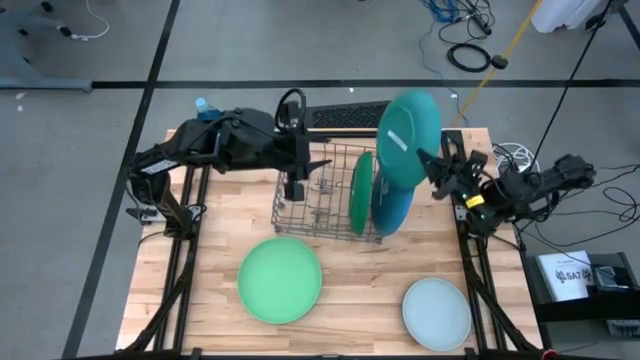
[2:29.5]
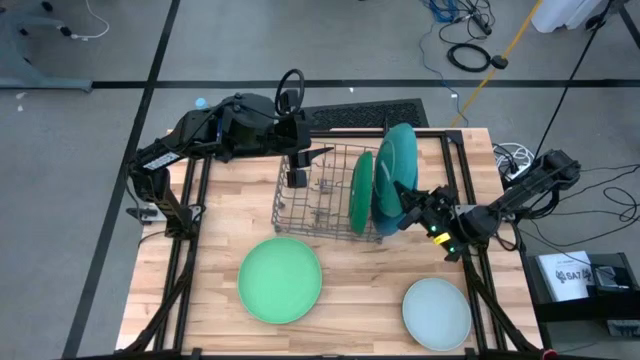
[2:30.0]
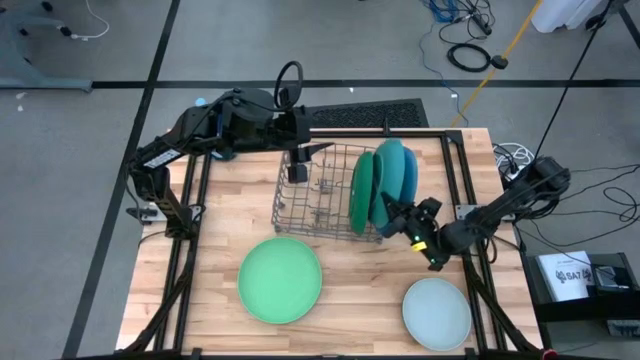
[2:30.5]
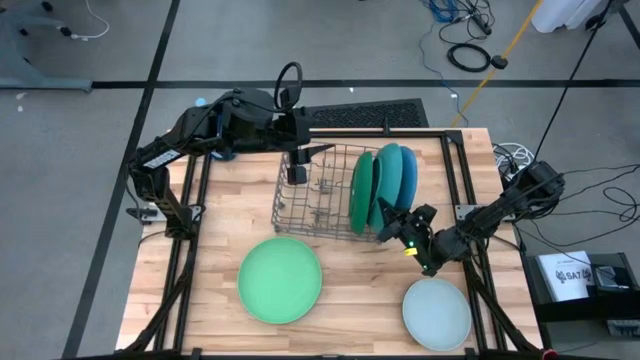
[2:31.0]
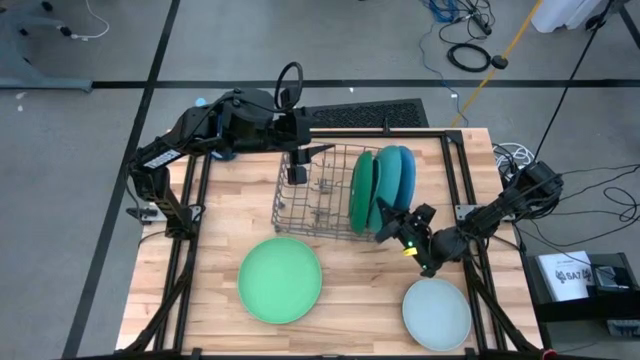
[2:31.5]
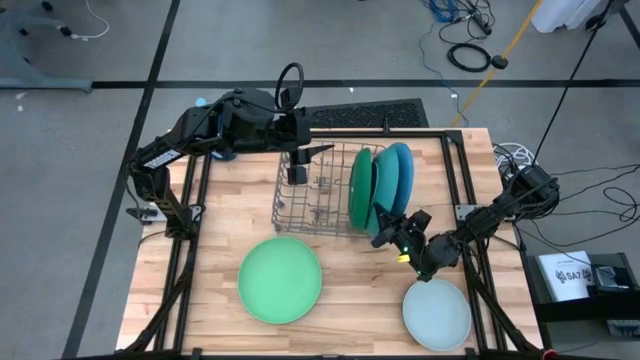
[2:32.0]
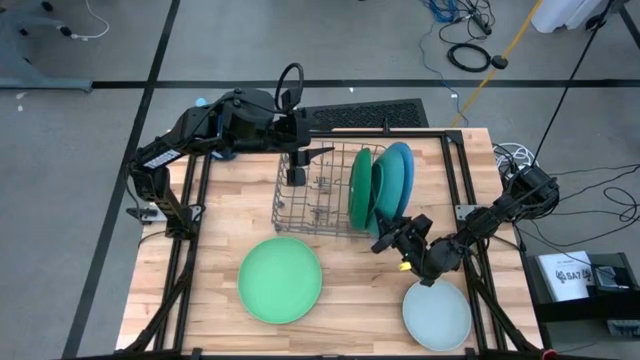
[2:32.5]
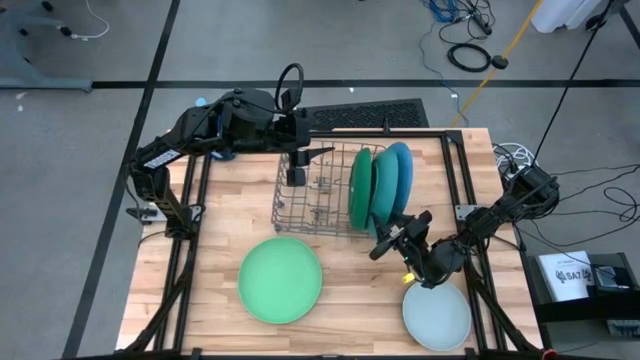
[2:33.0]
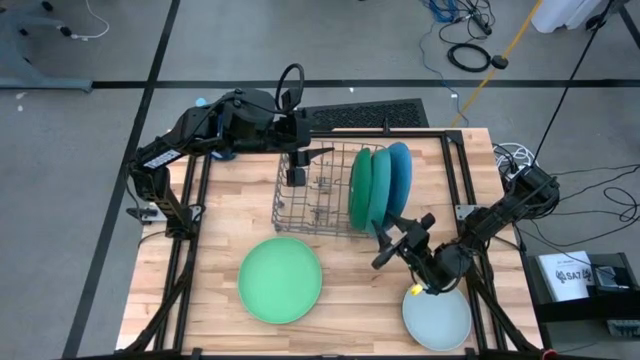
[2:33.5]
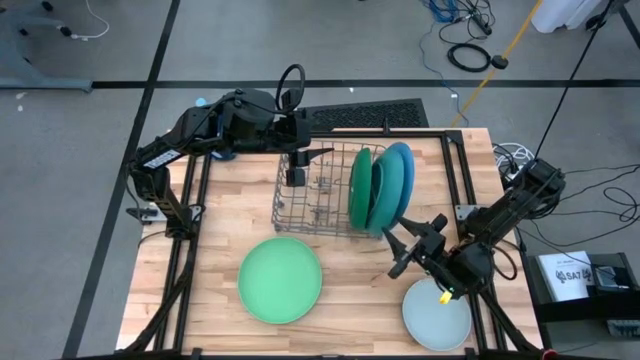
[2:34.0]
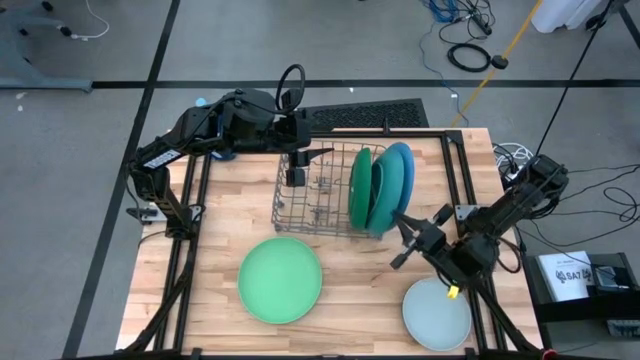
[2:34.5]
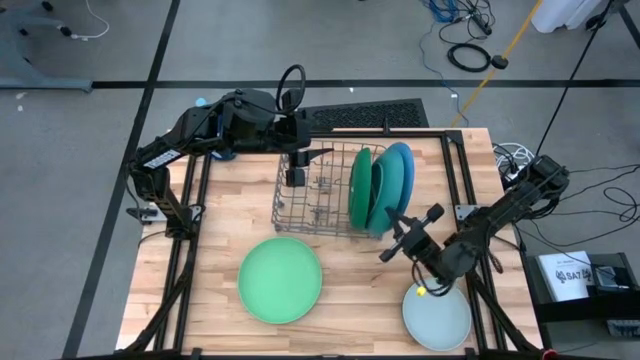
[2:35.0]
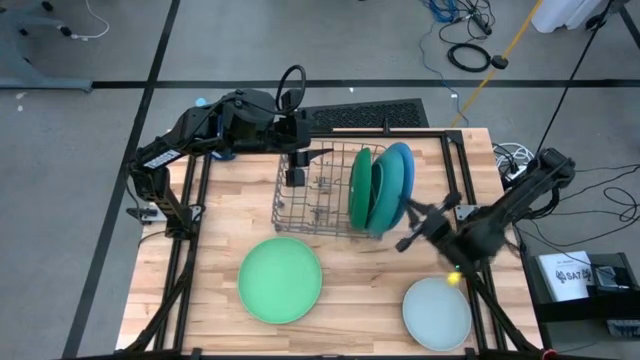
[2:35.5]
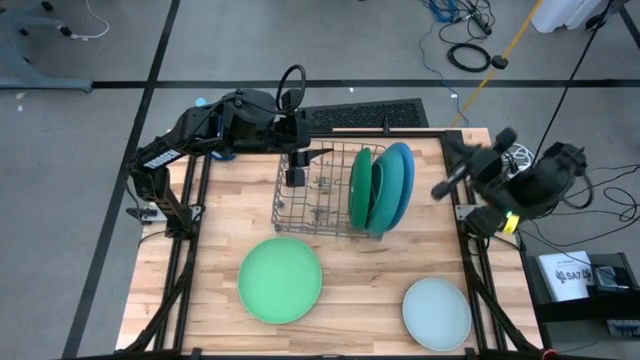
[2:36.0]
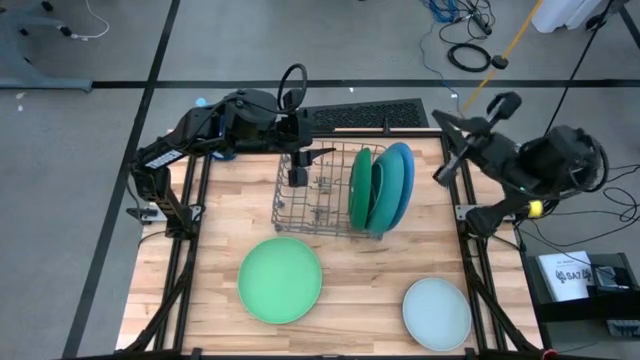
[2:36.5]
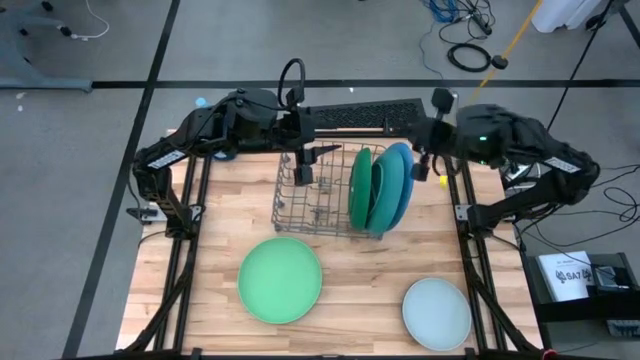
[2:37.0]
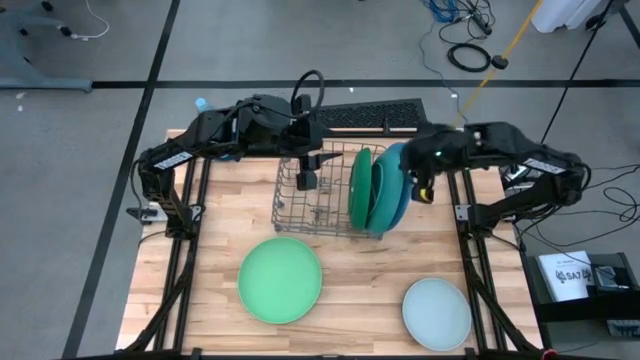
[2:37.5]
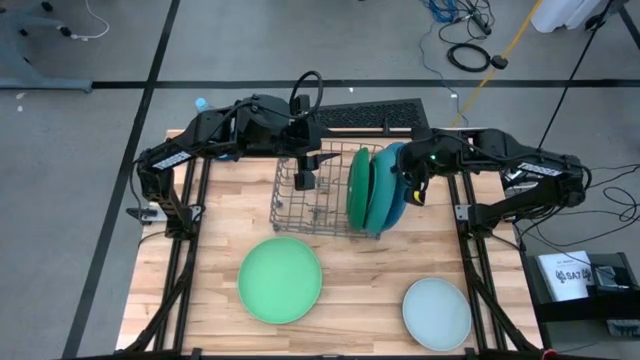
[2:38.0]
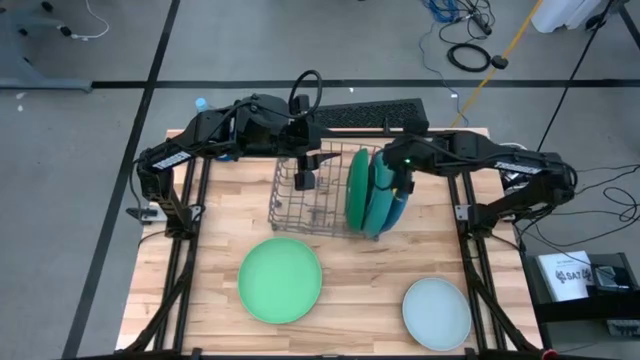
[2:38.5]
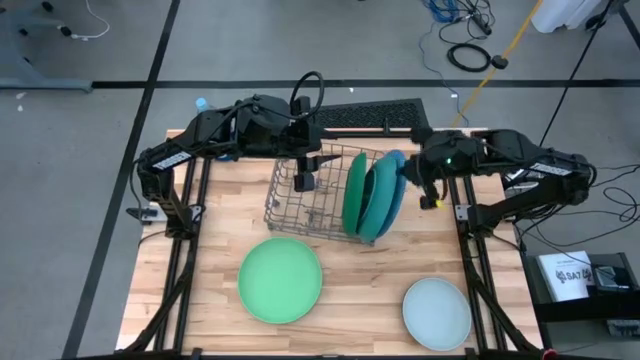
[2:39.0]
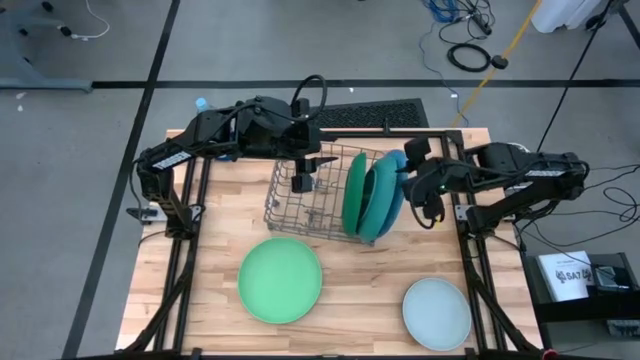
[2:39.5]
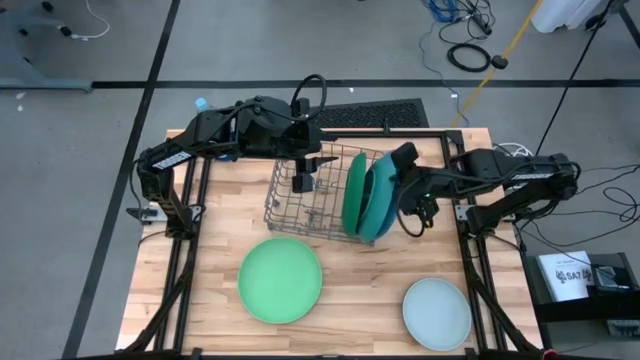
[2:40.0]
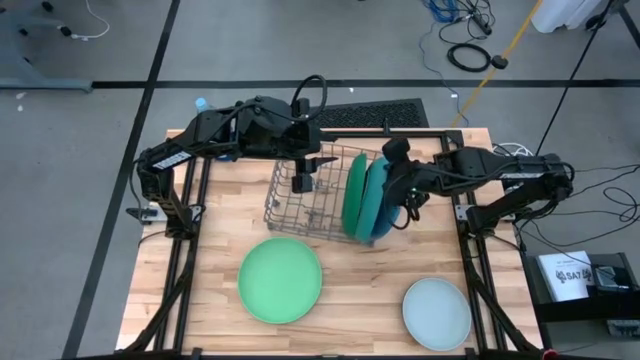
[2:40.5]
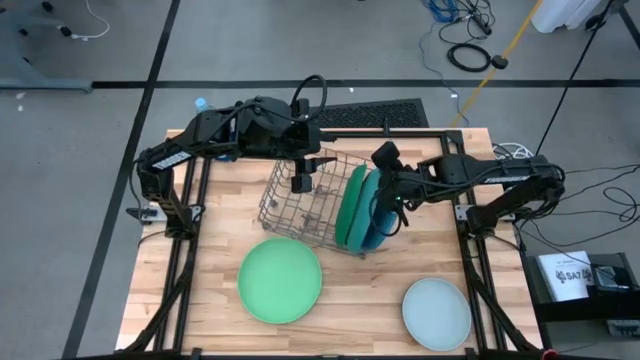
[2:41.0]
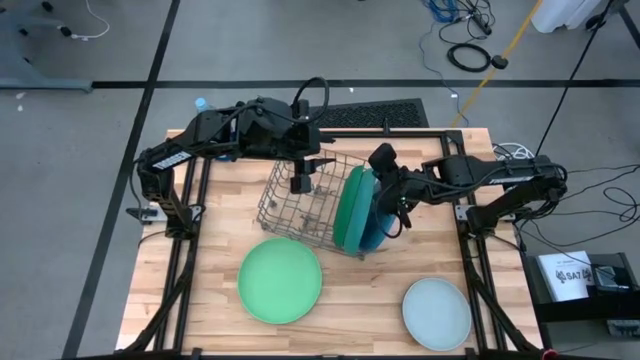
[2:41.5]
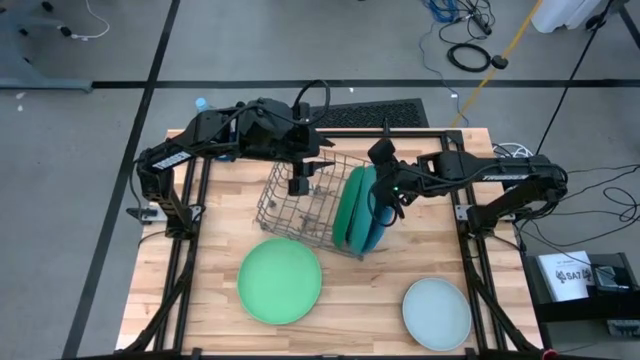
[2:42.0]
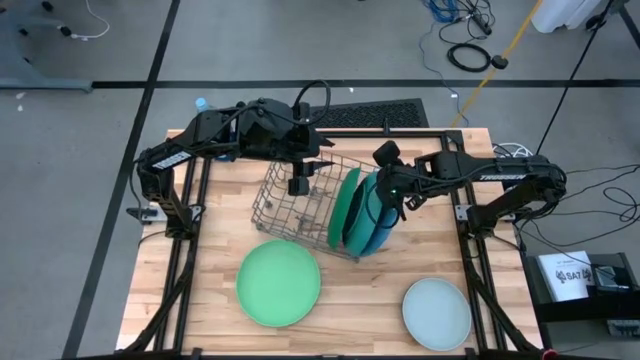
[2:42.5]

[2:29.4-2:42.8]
Task: Sort dishes
Put the green plate into the dish rack

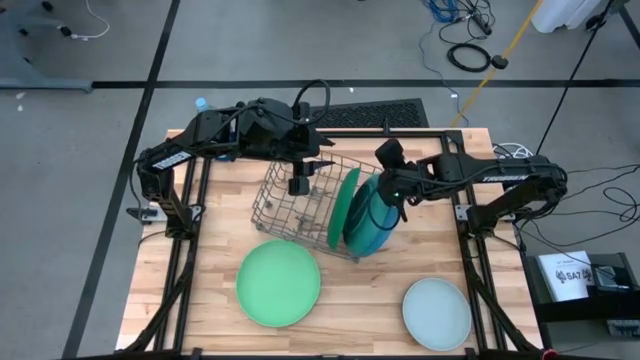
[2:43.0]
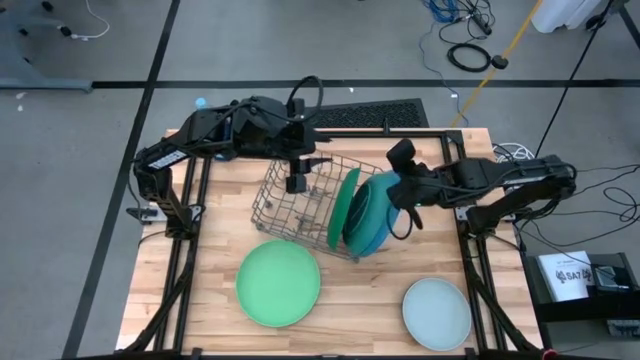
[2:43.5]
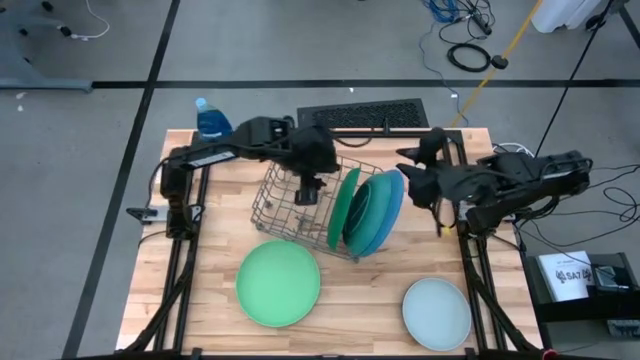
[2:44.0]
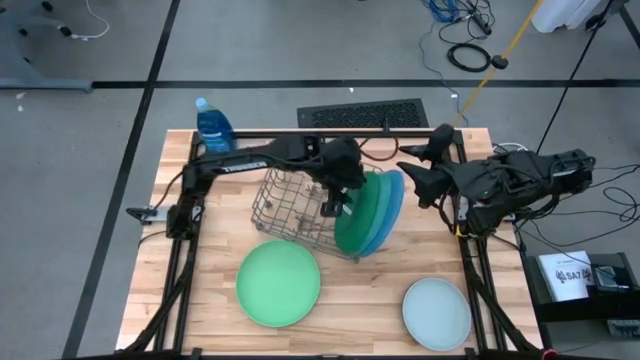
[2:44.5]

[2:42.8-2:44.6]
Adjust the dark green plate in the dish rack

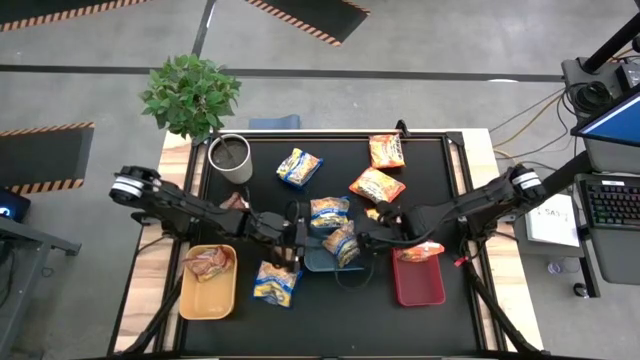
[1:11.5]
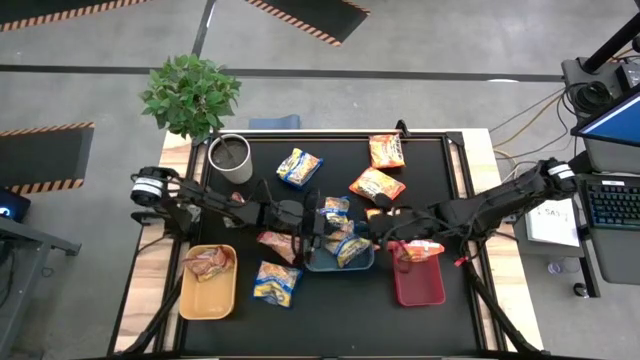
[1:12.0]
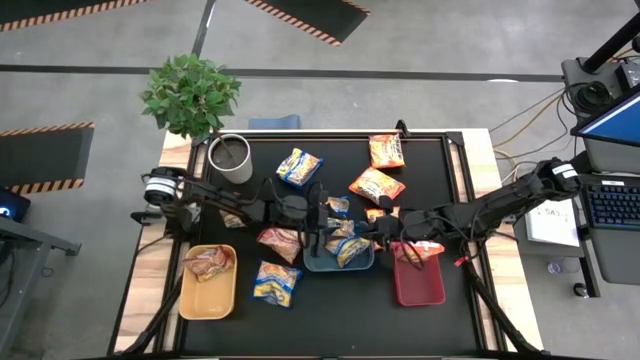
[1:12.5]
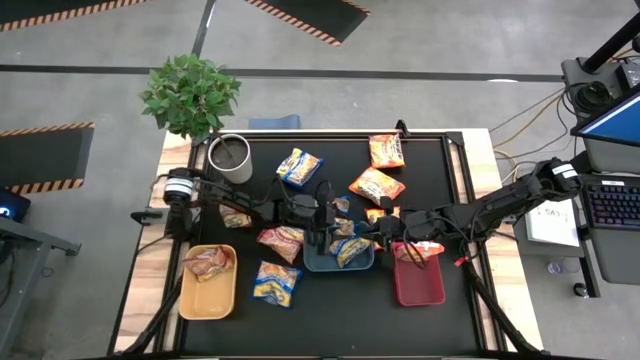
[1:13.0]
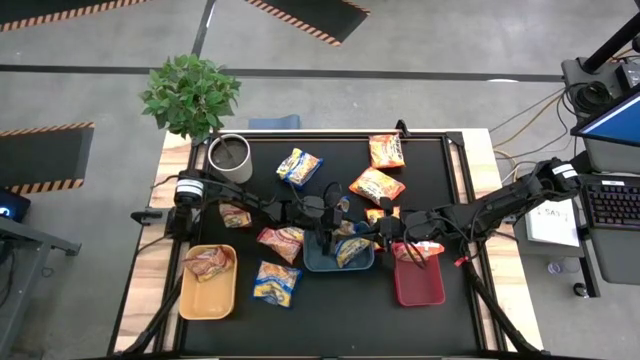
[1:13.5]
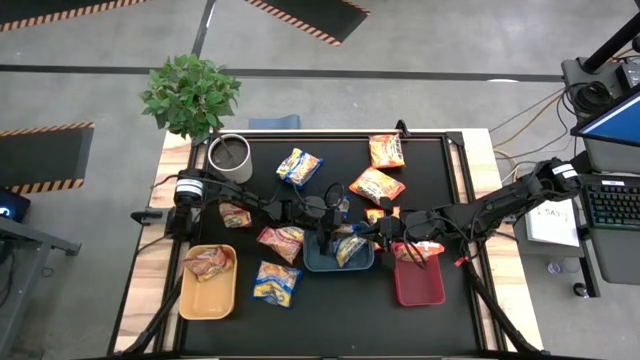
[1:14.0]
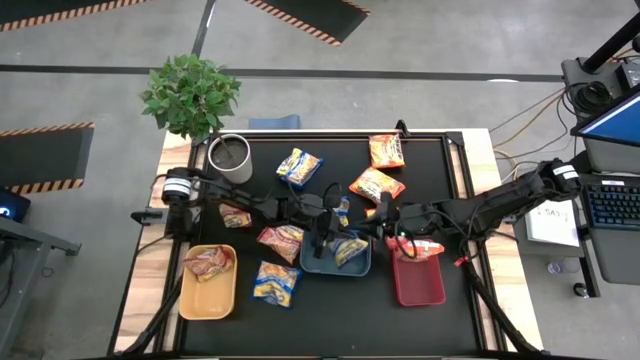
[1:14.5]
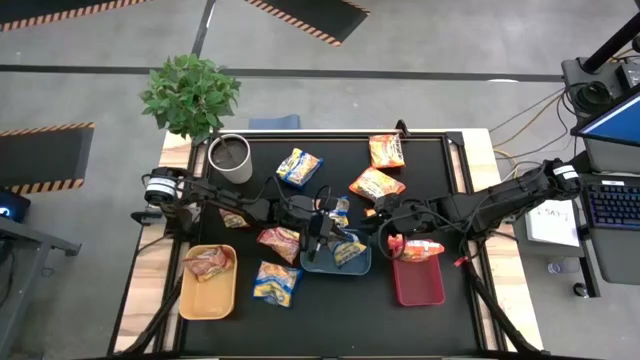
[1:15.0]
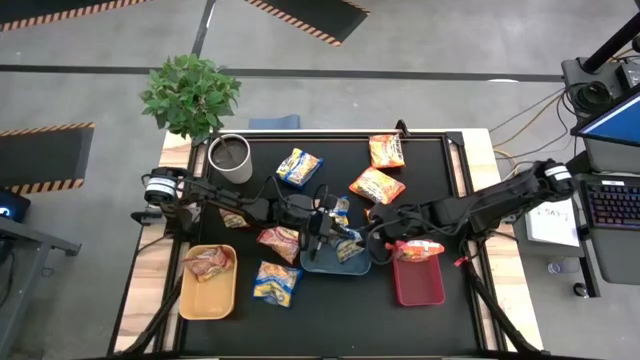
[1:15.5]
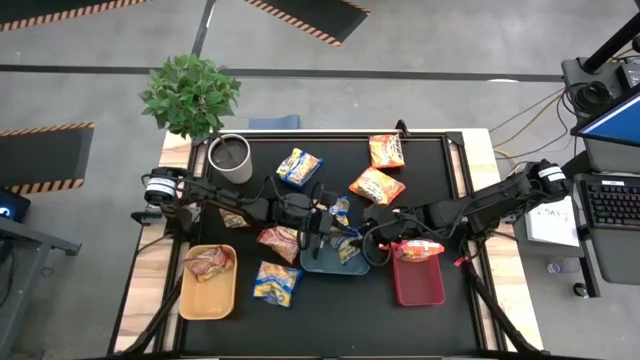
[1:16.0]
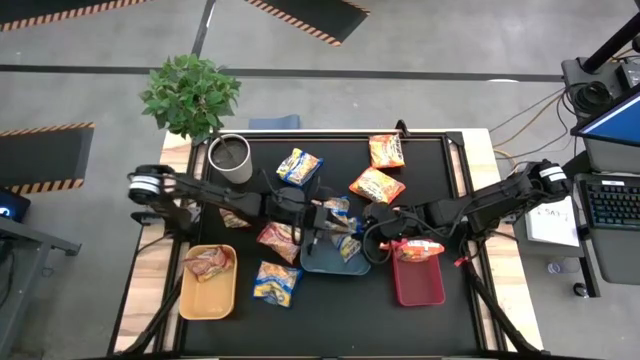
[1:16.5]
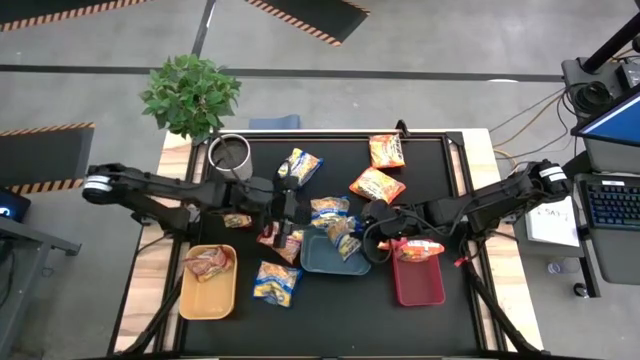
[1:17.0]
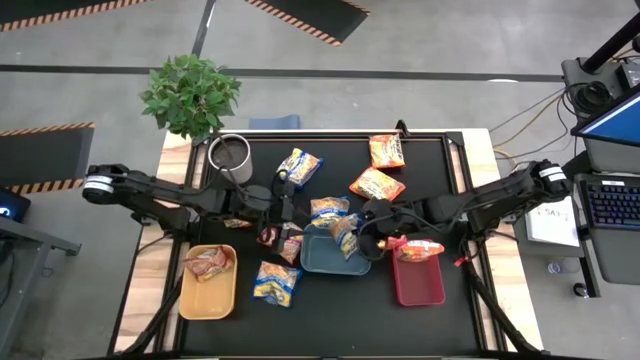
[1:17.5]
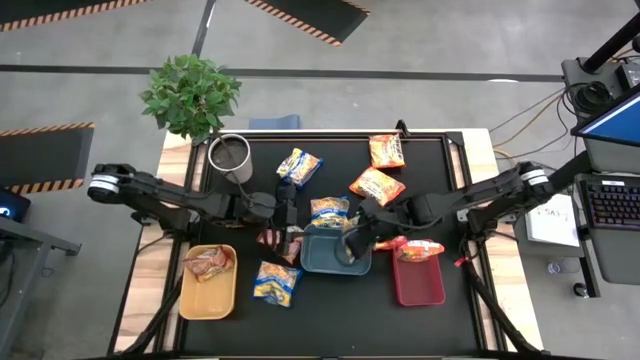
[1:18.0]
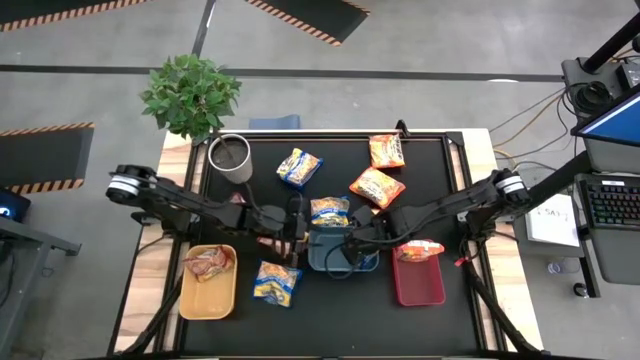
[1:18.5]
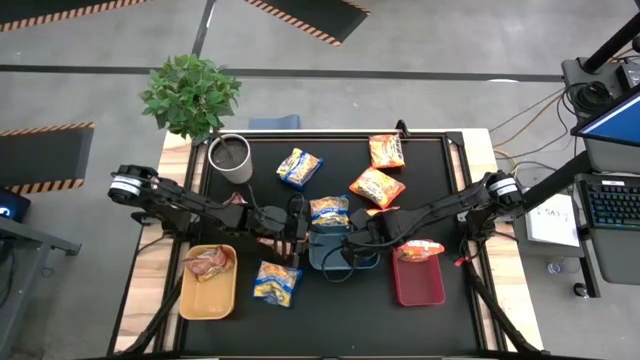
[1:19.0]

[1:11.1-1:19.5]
Task: Sort Maruchan noodles
Adjust the blue noodle pack
